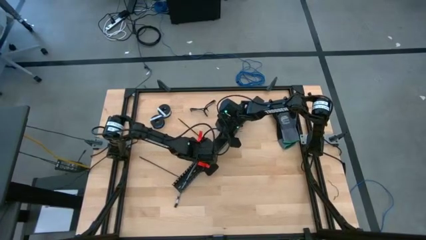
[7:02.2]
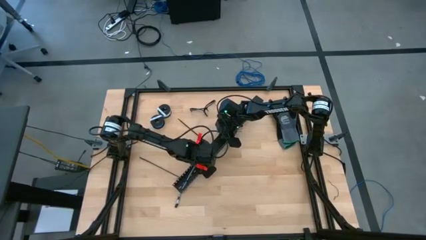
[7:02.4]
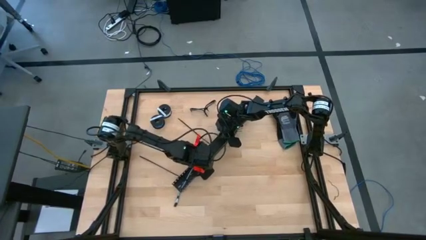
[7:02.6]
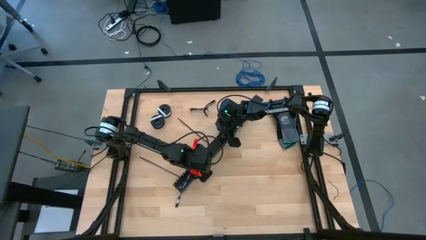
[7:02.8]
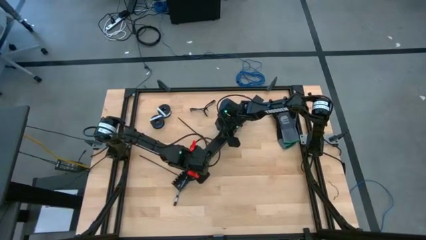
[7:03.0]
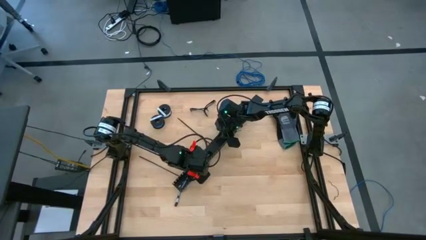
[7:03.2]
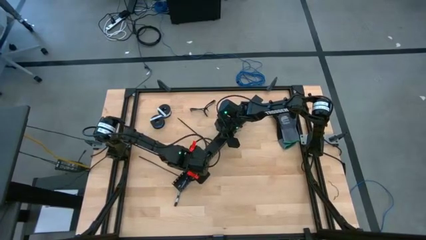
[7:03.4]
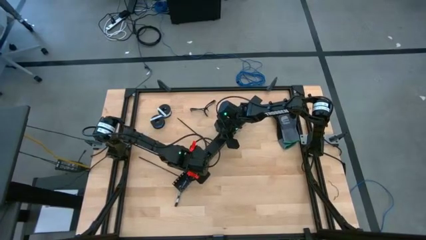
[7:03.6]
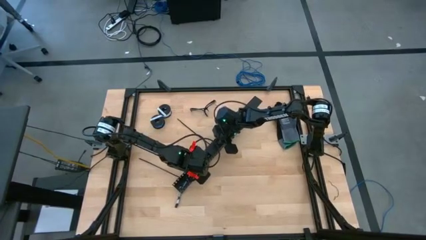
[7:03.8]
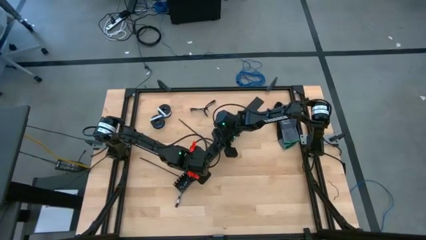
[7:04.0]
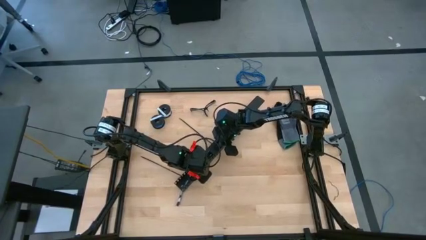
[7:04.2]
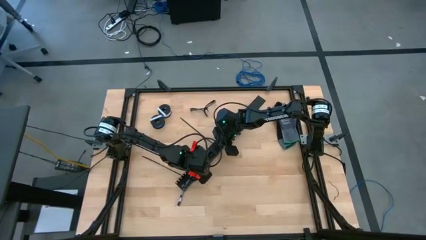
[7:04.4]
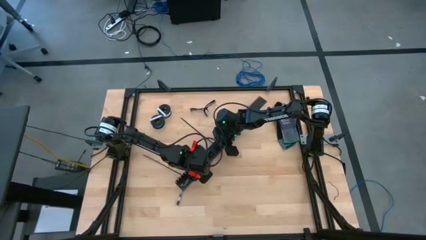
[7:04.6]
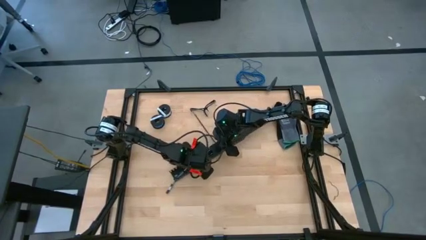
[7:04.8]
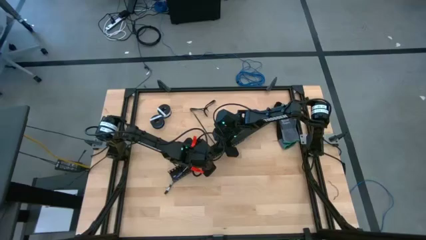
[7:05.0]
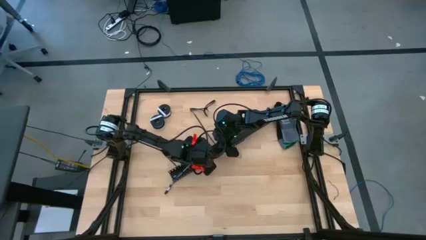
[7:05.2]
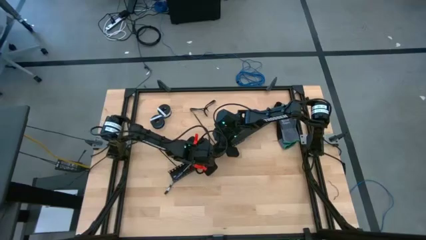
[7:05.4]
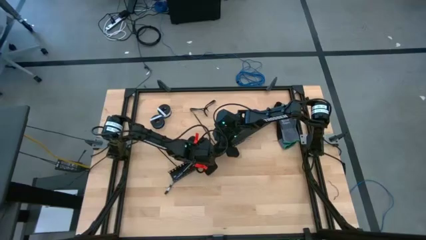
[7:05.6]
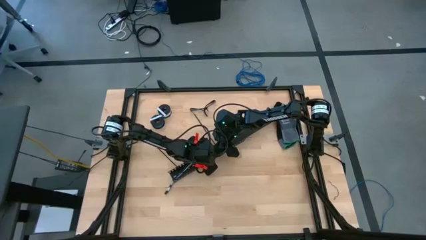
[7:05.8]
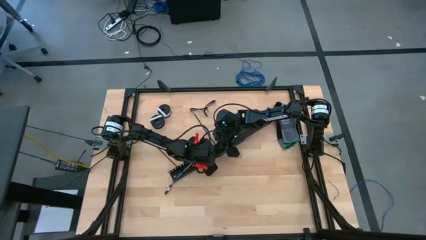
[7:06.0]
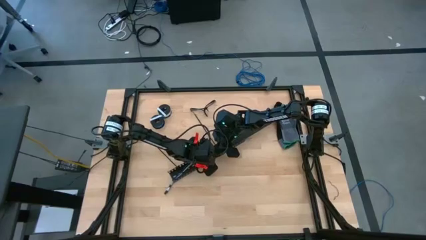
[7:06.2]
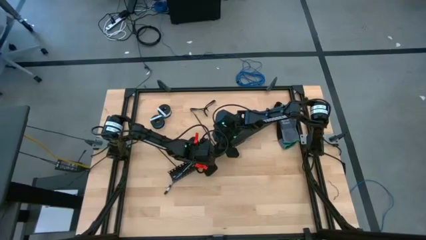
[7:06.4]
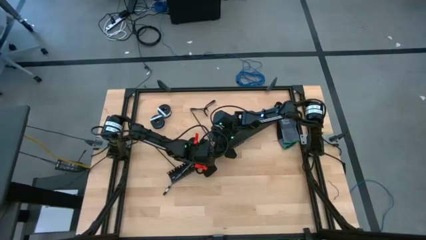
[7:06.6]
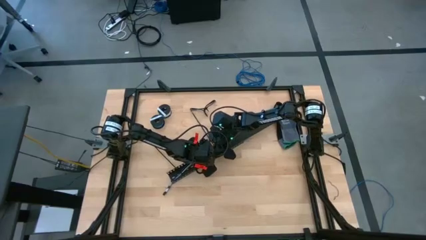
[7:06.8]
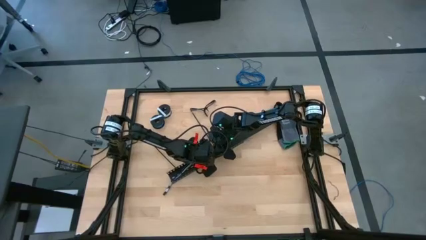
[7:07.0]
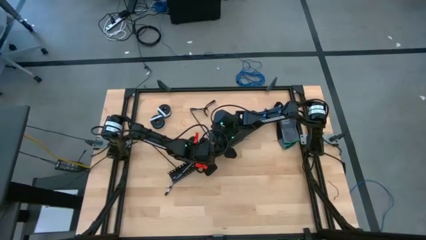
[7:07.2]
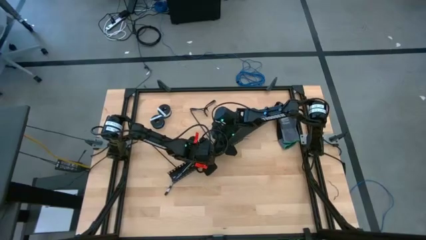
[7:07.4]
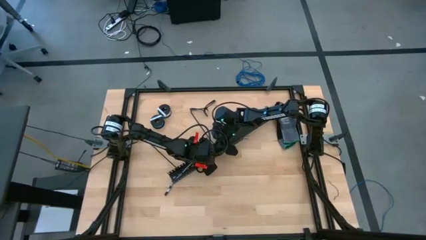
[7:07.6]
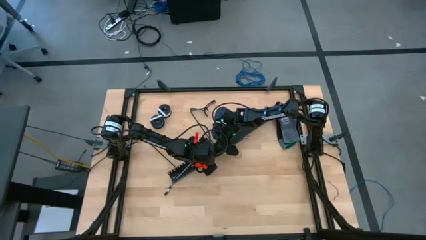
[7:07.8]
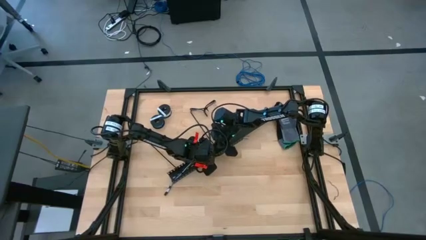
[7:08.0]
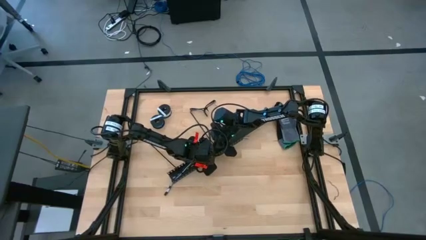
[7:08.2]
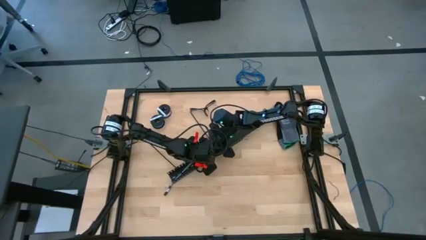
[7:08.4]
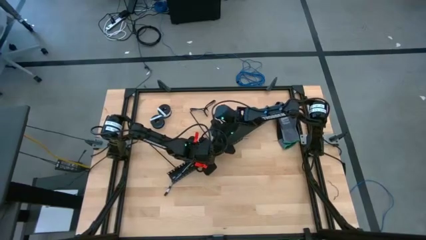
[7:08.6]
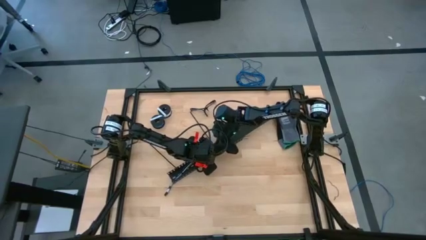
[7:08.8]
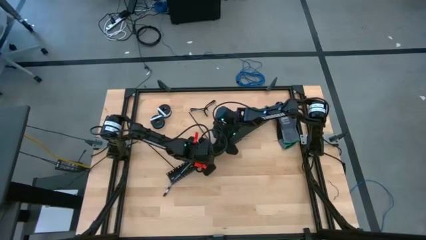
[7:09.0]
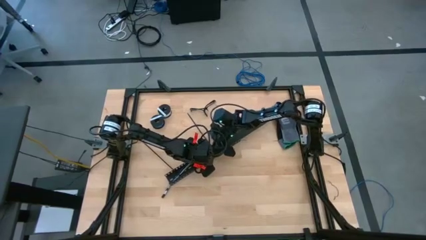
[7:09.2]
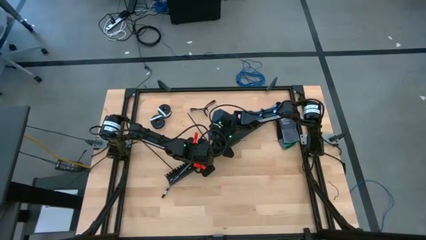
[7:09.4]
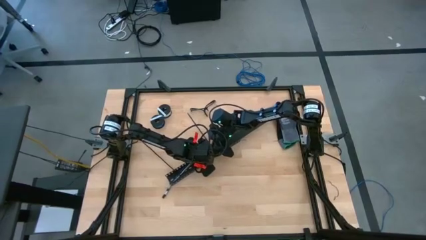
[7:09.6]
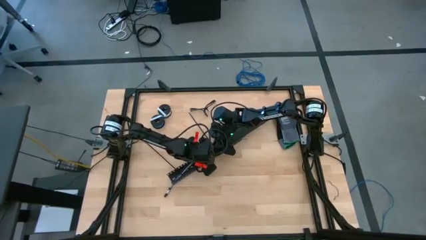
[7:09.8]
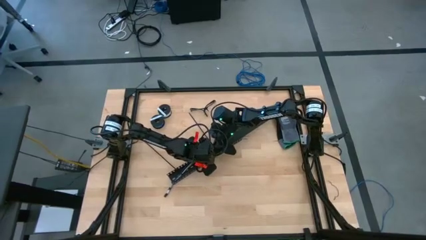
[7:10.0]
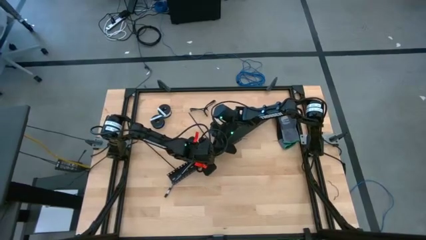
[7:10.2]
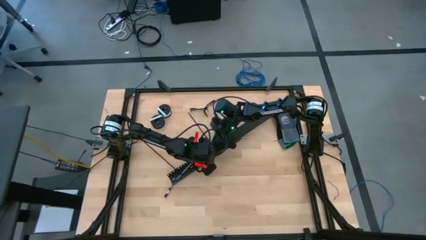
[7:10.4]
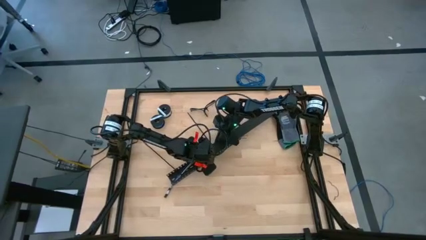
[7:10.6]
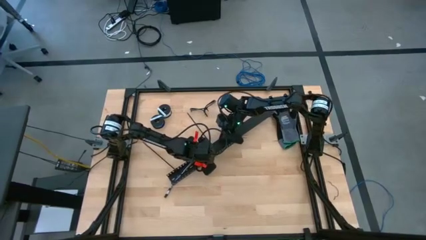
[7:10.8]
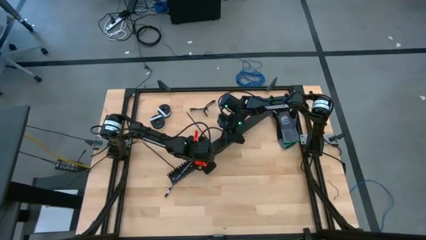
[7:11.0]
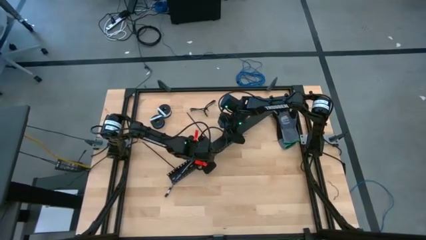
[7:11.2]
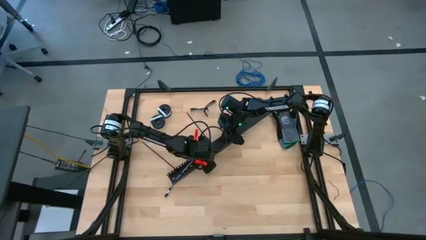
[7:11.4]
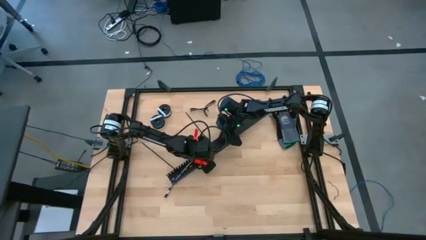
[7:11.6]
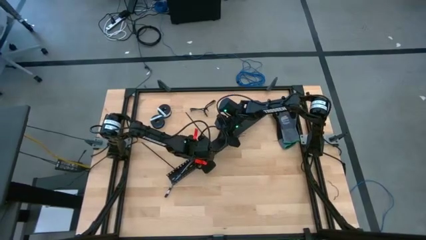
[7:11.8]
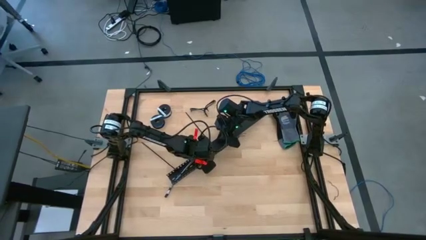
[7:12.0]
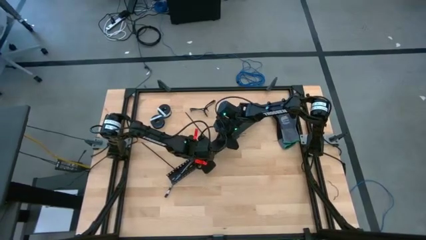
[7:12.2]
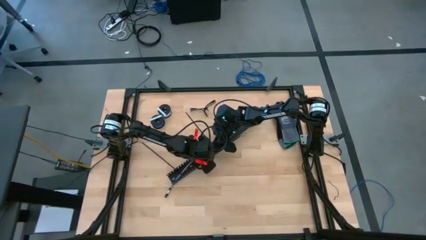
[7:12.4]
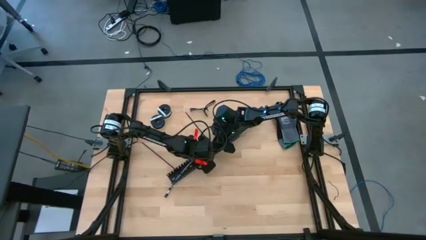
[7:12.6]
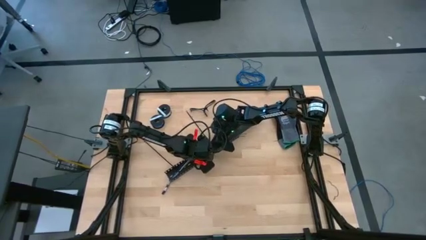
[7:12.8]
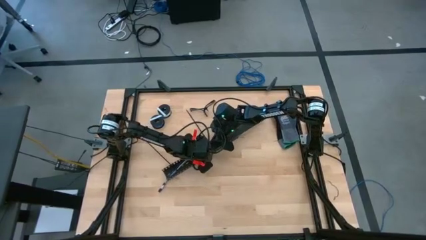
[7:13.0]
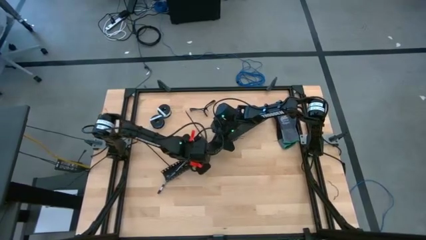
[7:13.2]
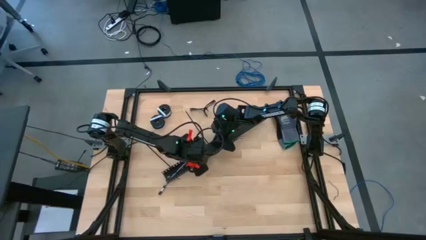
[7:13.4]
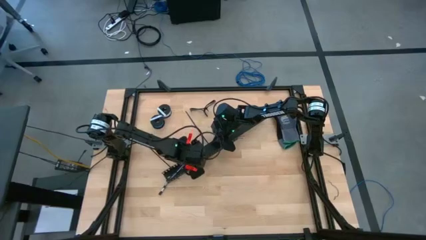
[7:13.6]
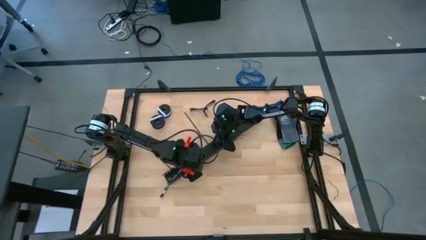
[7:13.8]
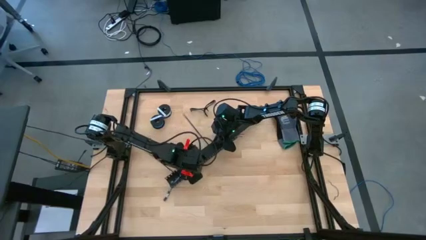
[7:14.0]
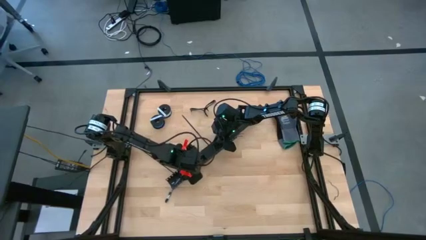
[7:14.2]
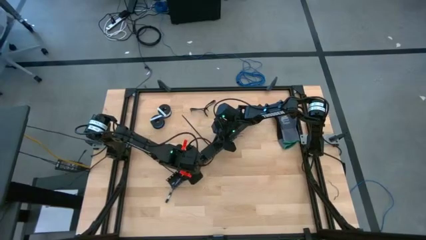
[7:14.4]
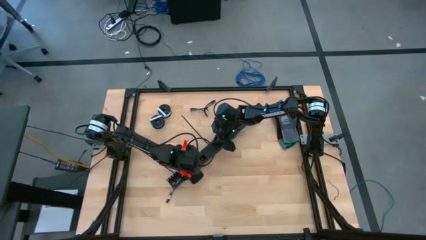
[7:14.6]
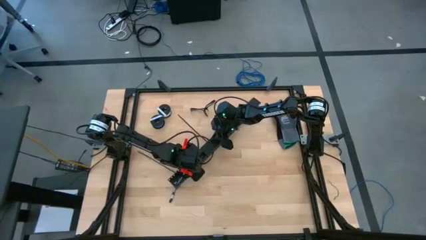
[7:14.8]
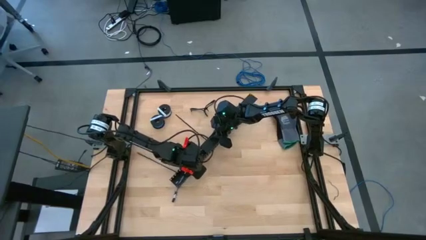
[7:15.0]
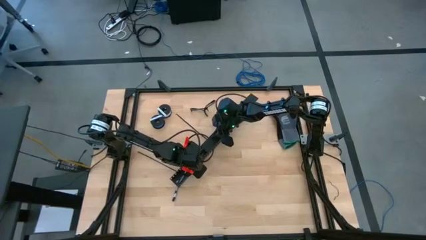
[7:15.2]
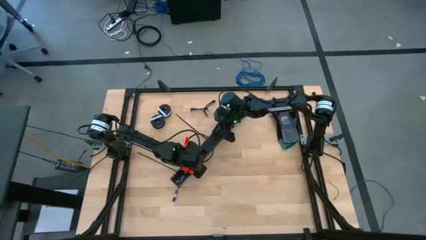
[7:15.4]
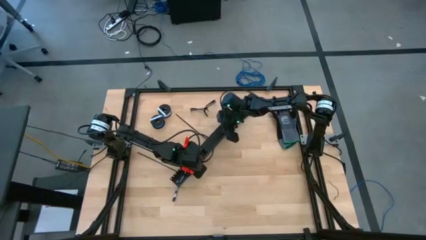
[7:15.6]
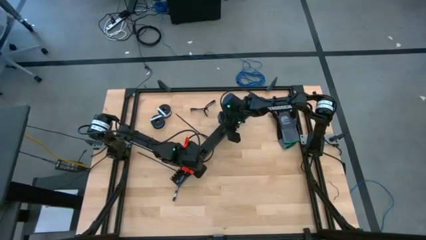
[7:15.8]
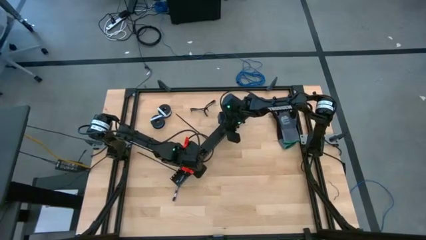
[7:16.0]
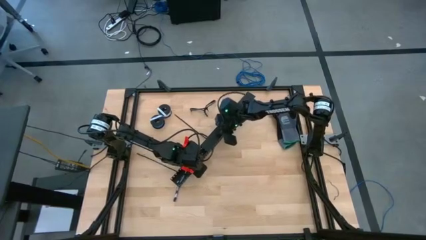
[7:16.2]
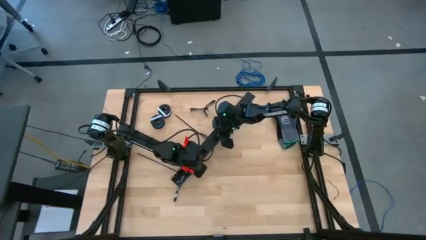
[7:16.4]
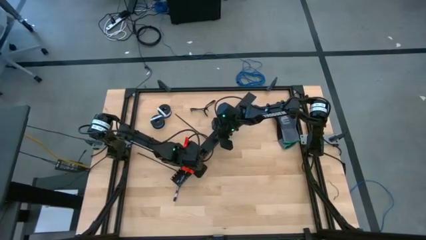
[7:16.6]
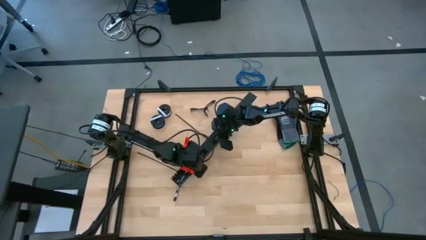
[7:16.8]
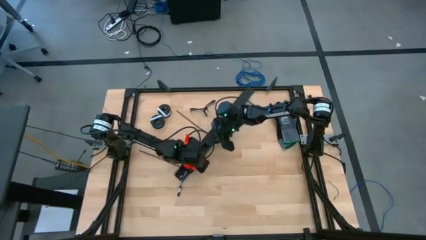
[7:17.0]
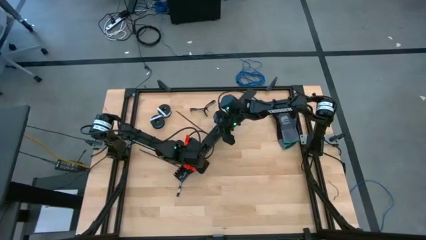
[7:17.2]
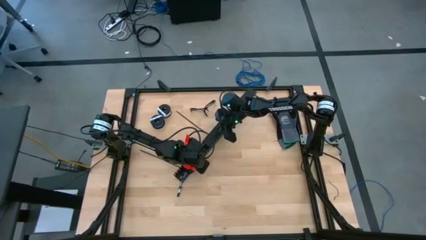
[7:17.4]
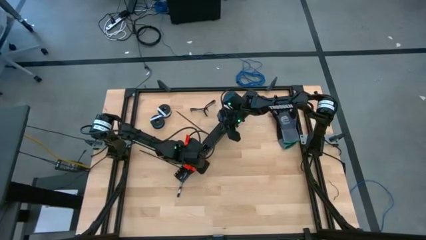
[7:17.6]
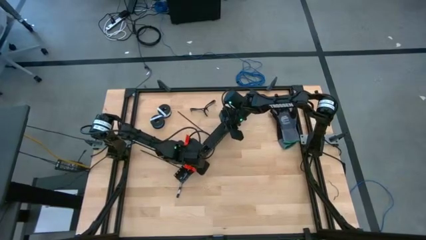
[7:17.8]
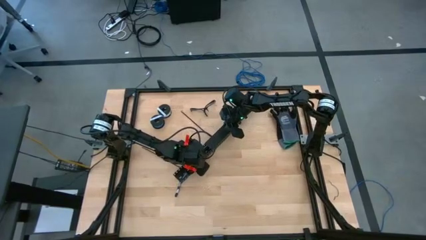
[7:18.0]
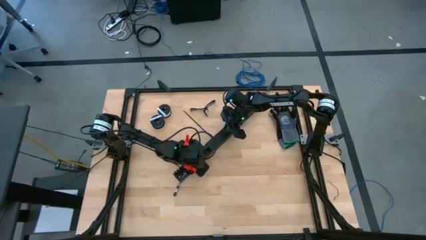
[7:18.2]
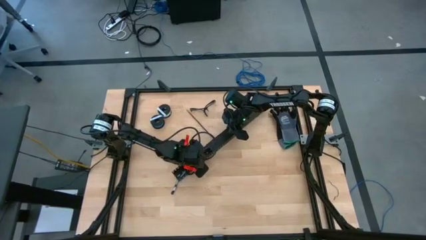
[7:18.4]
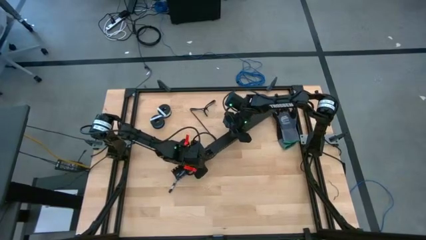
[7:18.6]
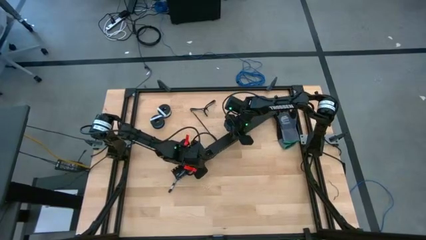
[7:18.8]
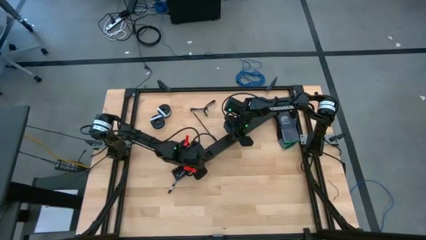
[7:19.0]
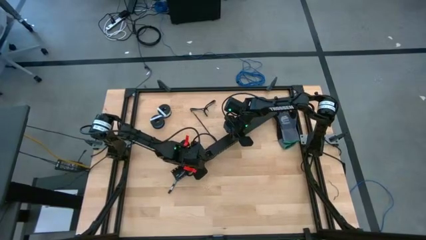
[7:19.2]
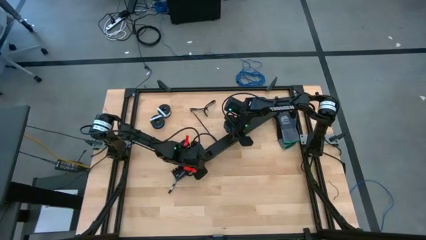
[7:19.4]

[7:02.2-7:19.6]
Task: Ziptie cables
Insert the black cover of the black cable duct
